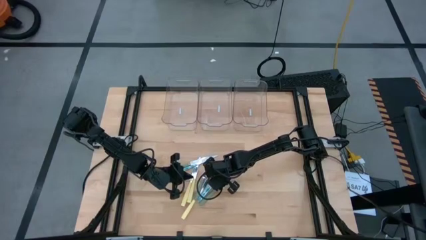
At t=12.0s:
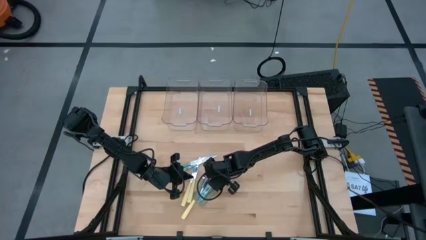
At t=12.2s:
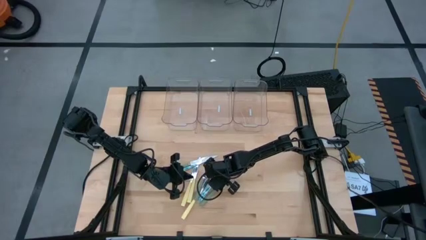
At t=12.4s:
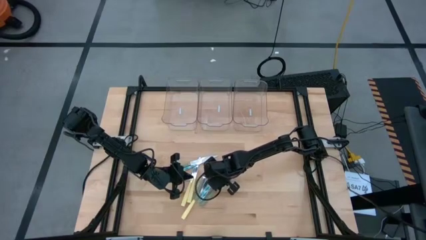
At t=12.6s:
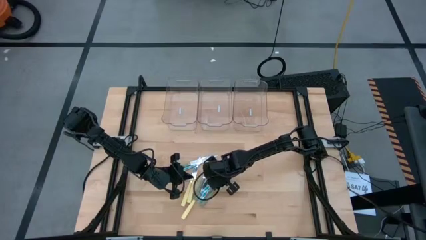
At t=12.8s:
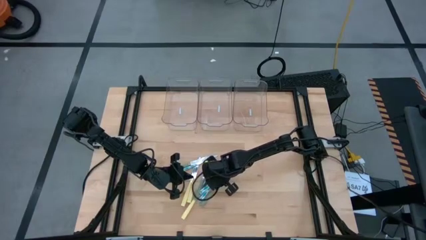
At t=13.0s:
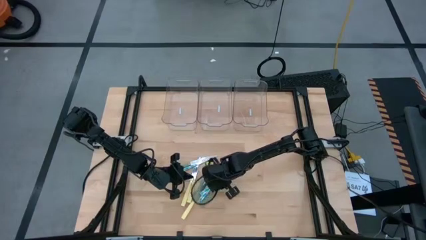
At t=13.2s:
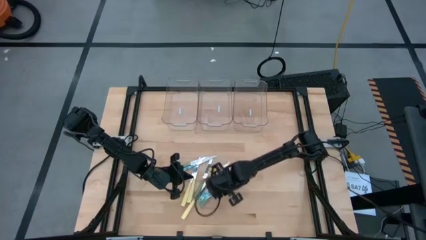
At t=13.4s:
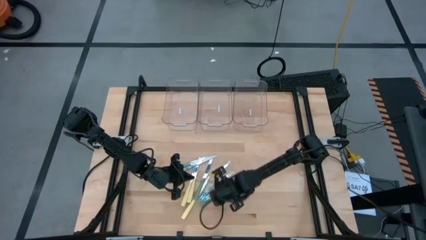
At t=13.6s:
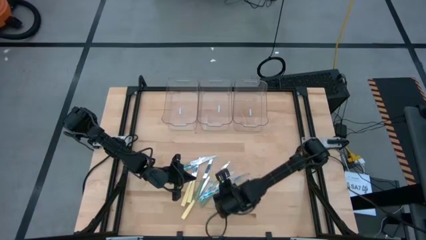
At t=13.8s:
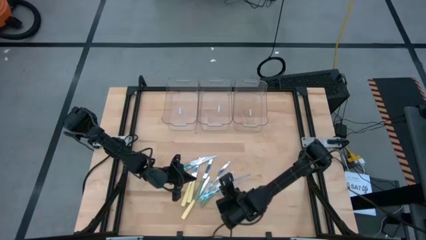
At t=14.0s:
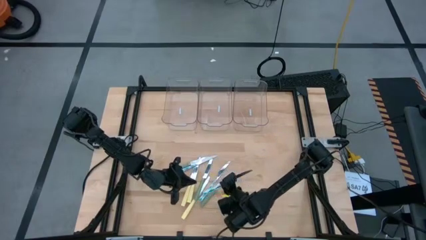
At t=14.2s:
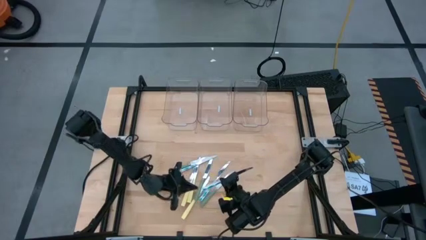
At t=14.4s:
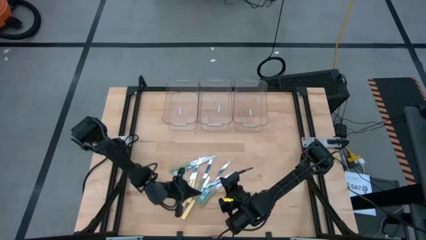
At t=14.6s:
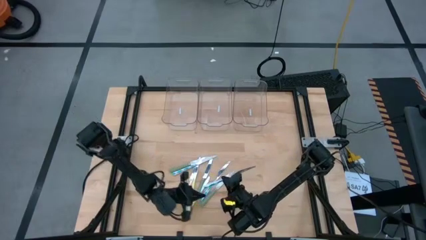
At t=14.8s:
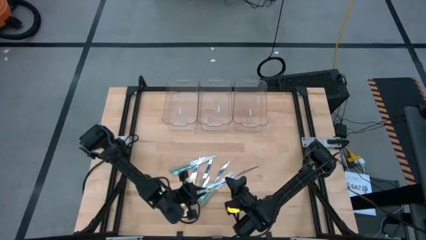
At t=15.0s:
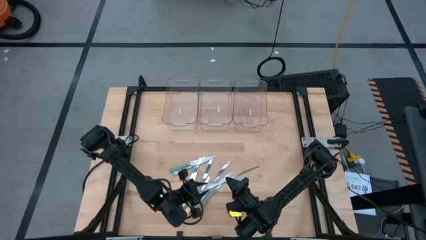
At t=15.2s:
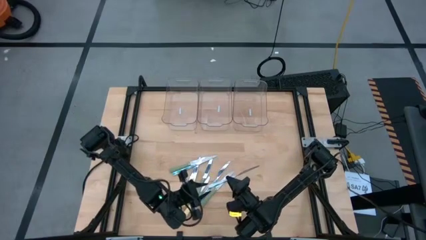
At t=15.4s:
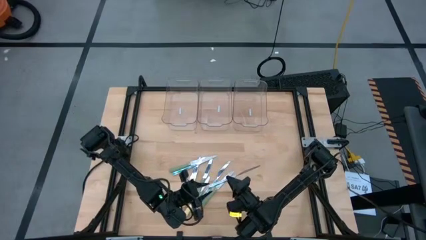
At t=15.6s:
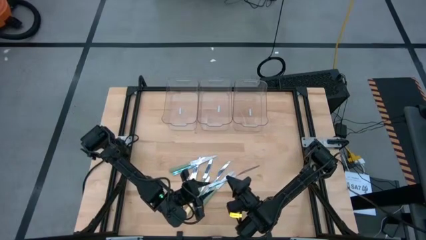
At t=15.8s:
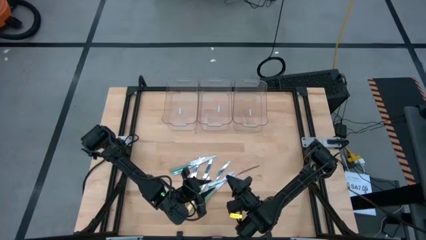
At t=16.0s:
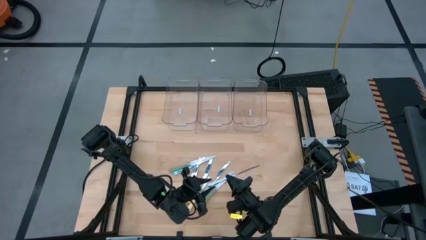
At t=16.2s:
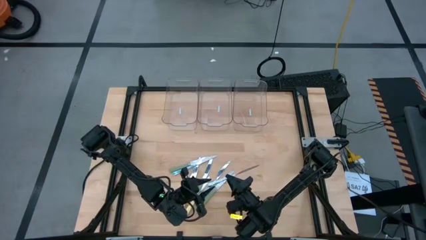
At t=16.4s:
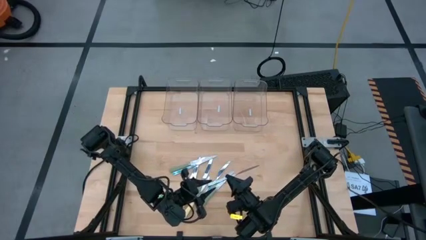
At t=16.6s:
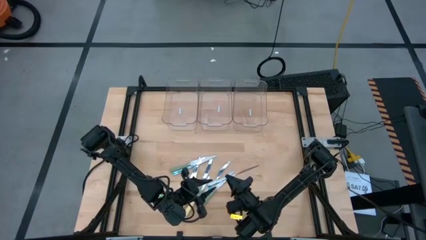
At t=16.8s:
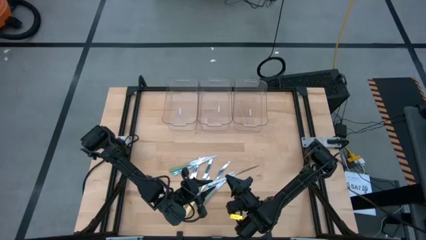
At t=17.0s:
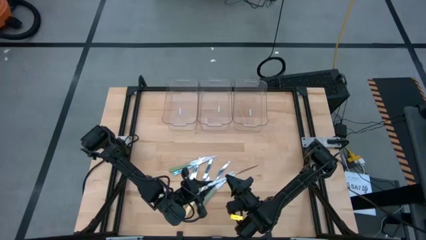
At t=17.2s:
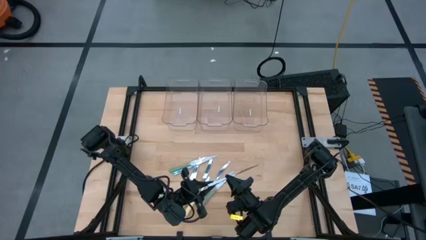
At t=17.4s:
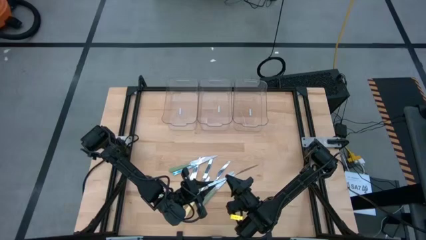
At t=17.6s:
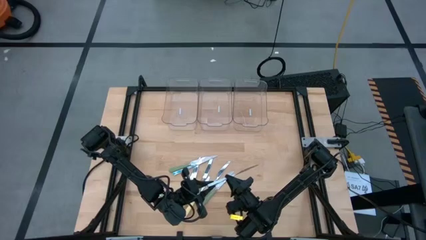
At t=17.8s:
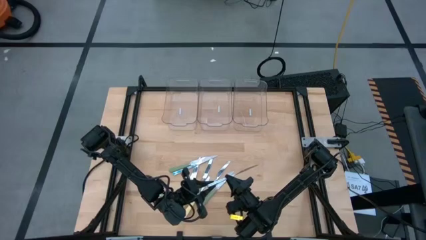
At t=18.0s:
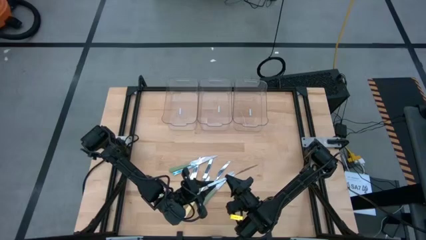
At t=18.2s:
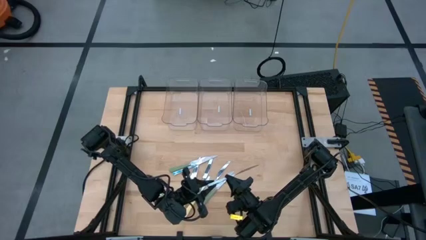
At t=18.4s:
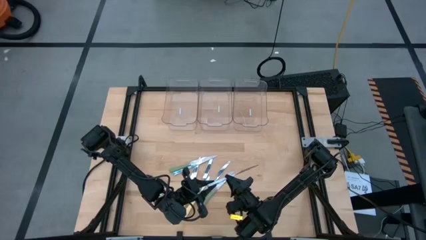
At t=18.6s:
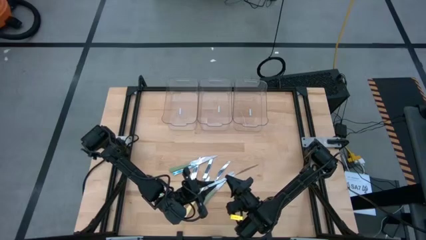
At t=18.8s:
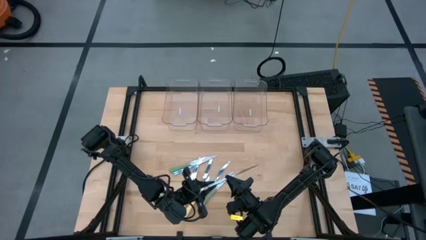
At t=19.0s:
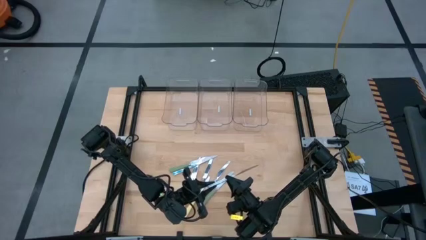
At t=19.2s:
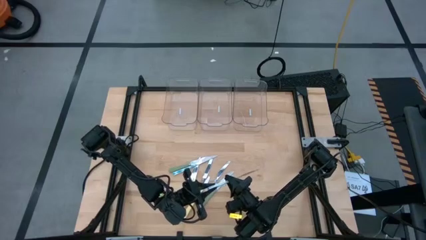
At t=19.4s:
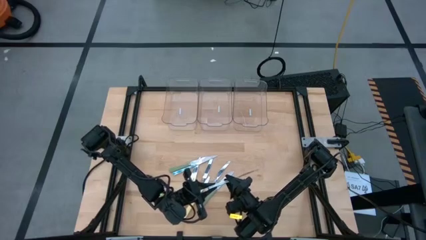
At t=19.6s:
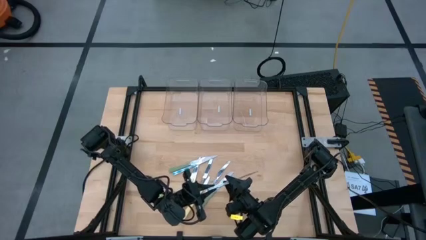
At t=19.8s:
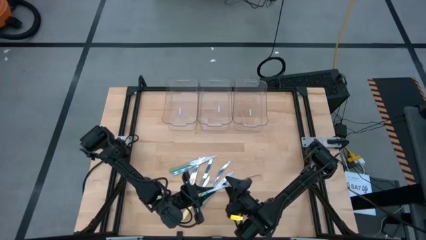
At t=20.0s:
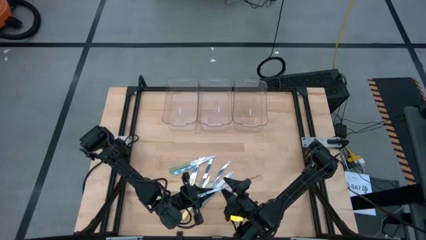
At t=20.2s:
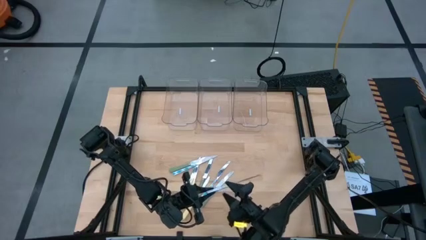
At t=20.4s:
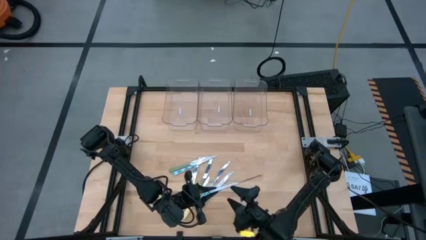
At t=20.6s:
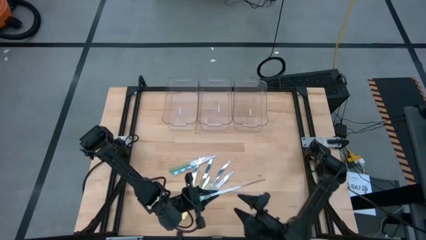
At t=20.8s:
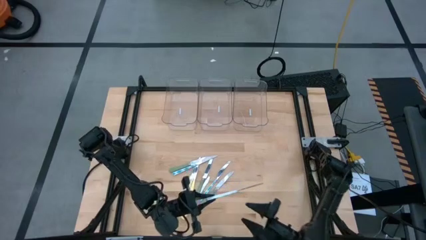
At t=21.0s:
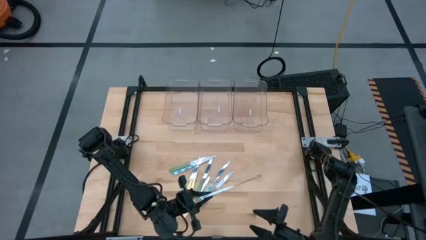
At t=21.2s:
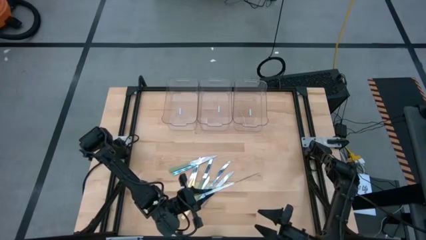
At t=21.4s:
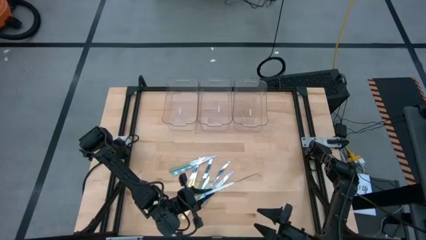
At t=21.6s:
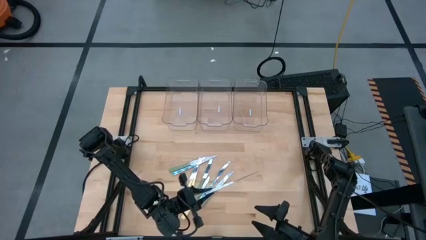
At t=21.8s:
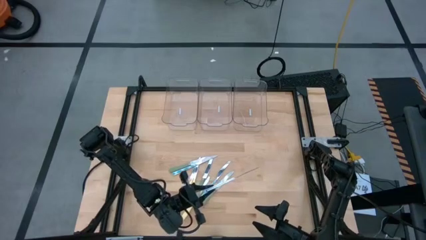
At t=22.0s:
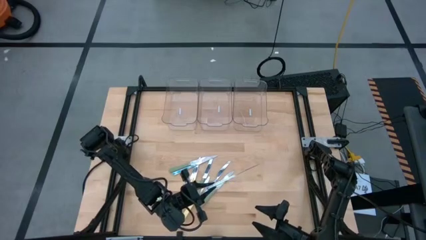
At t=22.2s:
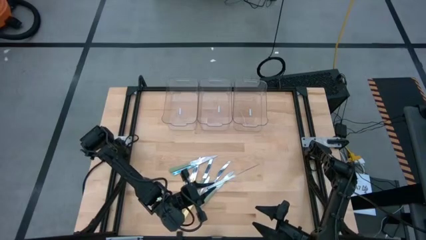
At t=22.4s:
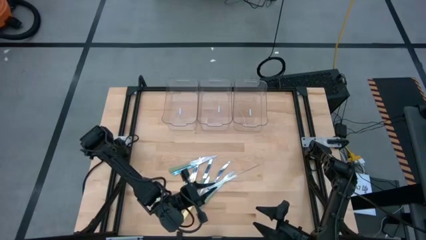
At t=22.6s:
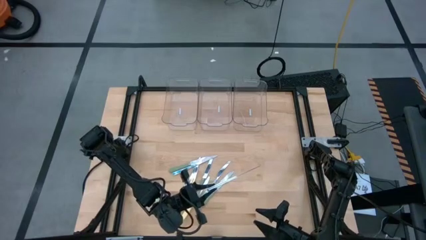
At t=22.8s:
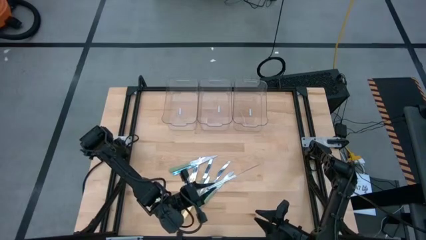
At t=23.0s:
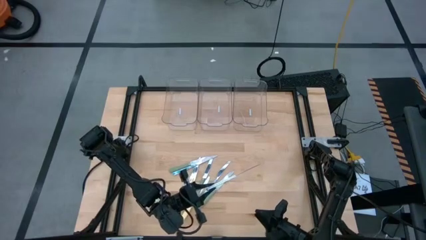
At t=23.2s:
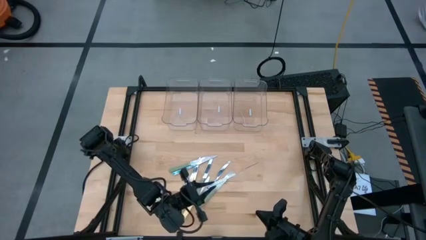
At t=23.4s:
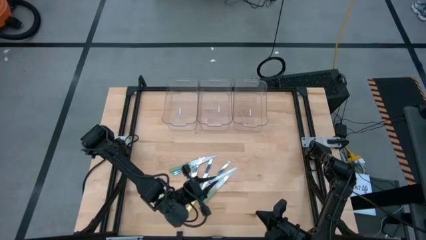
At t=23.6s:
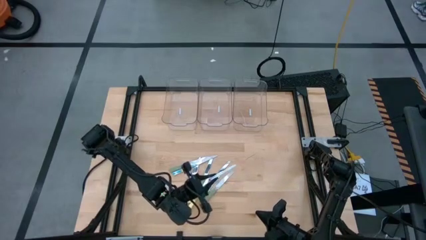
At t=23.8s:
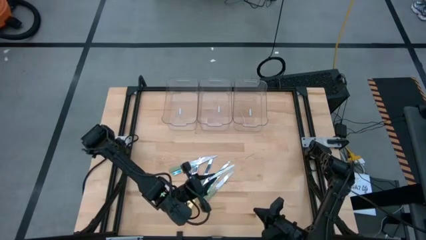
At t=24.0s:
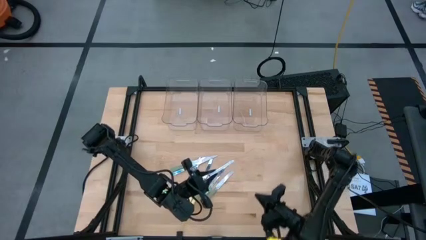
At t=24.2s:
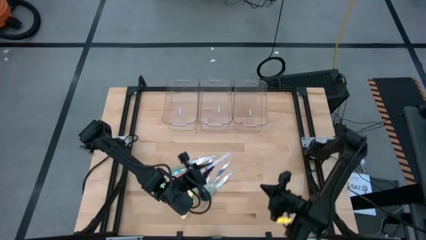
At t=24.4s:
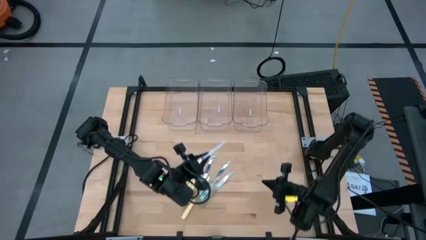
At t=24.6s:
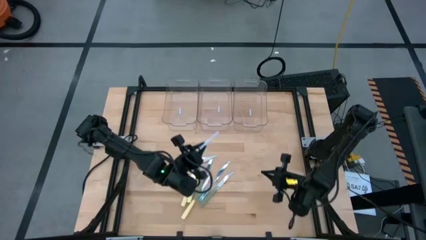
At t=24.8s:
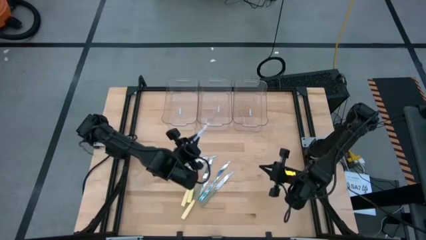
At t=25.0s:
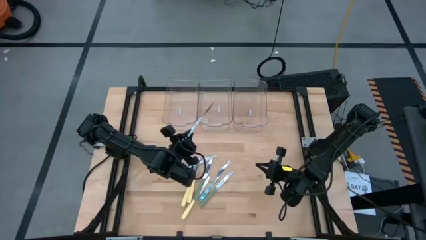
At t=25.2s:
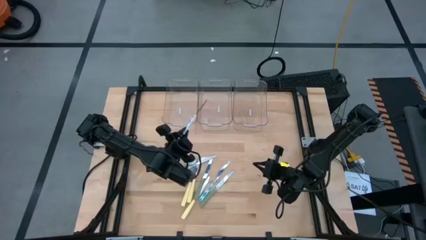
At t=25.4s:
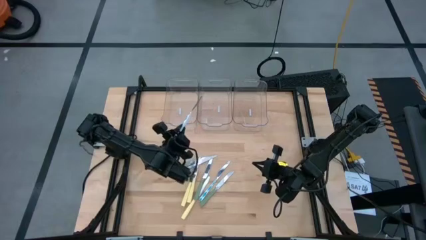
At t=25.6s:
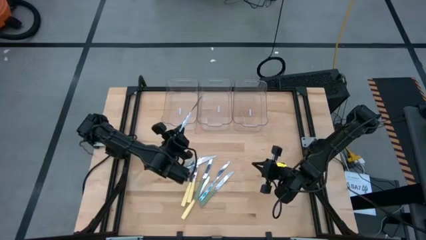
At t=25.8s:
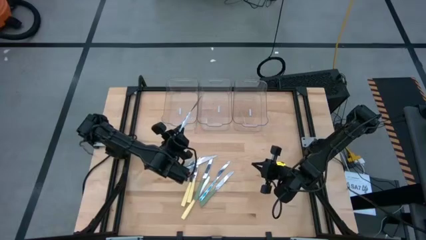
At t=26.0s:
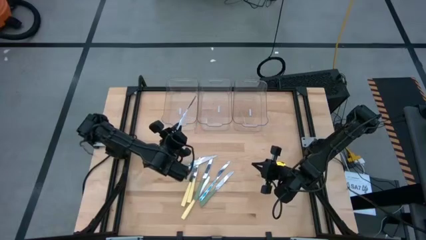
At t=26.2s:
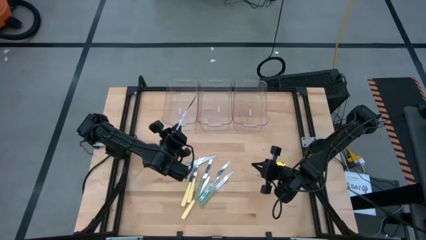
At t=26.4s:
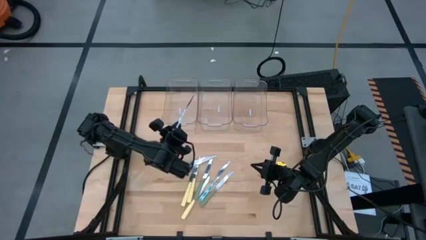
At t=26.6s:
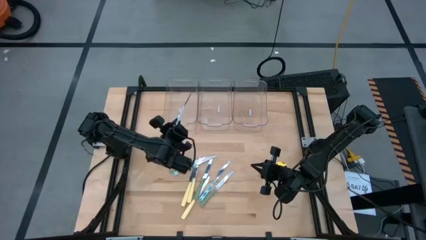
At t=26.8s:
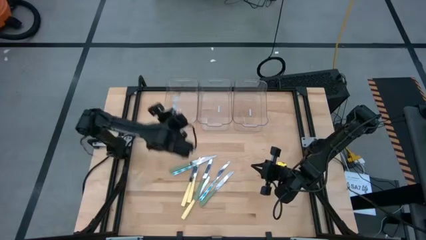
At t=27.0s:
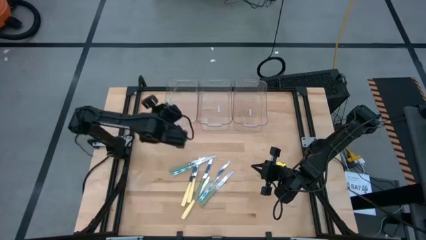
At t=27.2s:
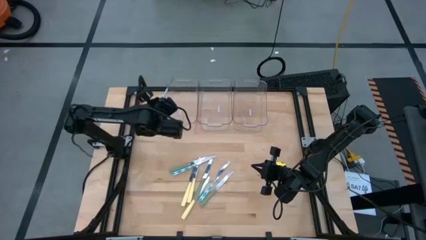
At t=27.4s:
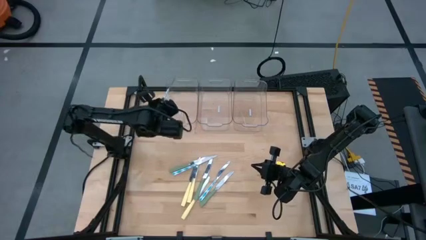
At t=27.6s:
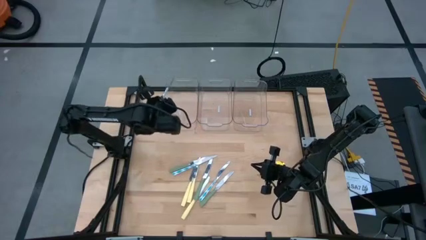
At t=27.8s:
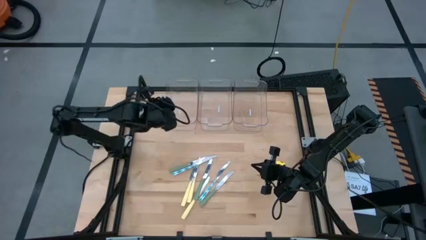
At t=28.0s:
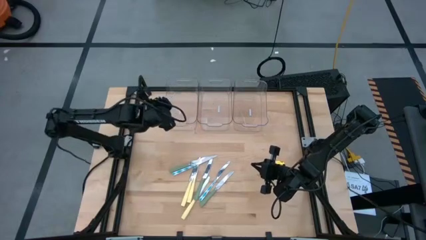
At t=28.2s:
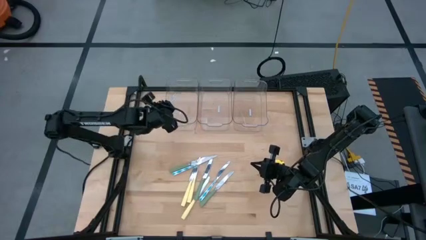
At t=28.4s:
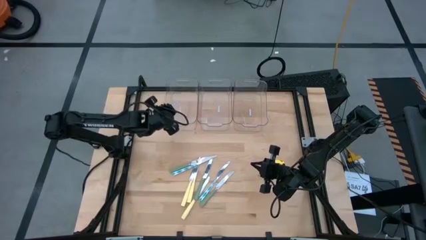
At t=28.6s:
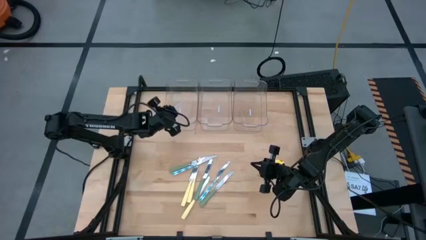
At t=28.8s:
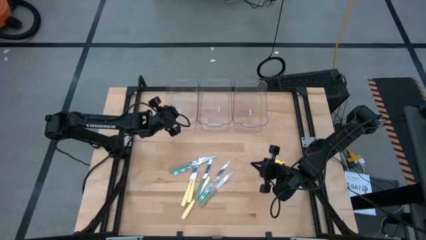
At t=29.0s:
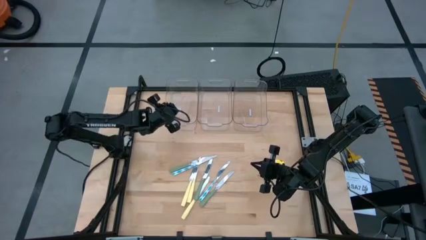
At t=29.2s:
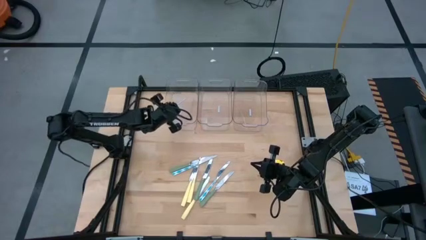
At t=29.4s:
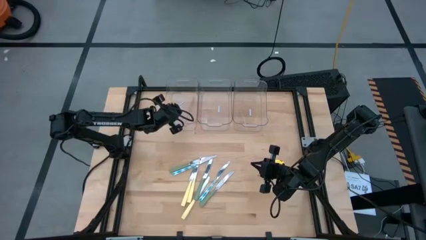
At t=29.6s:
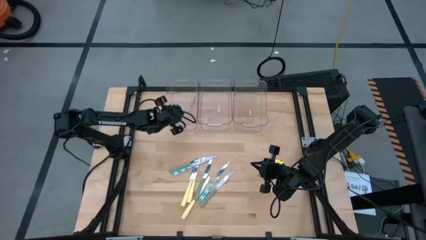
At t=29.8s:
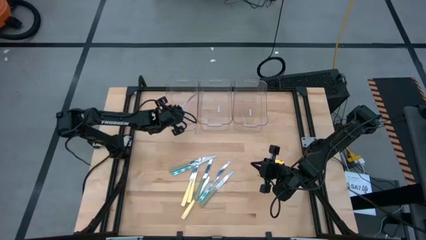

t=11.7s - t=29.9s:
Task: Sort silverware by color (type)
Put the blue patterned knife into the left transparent bin
